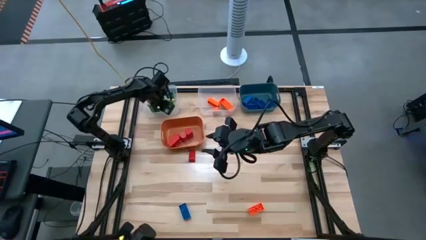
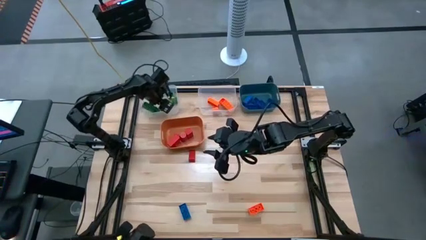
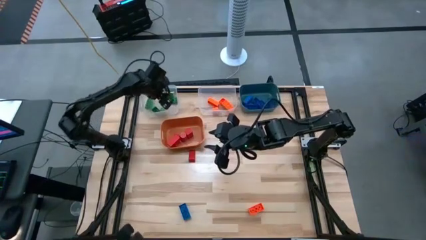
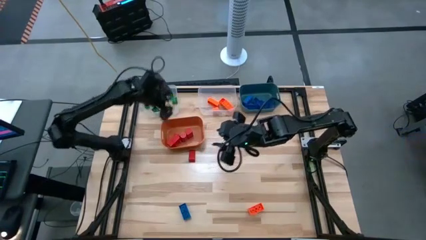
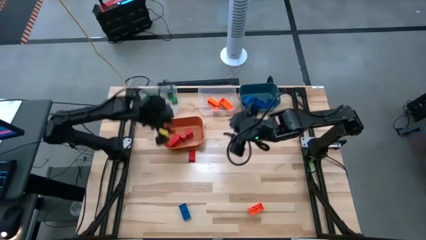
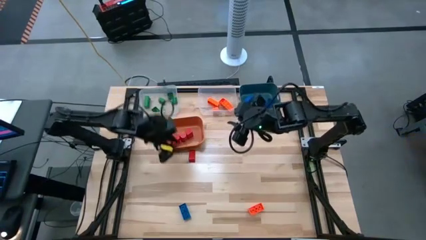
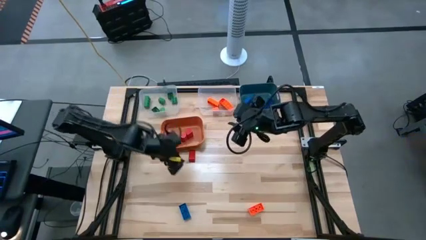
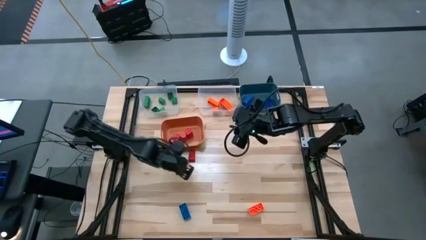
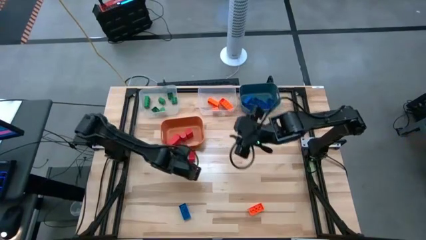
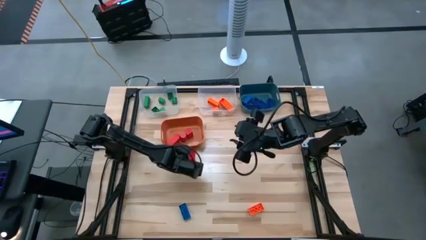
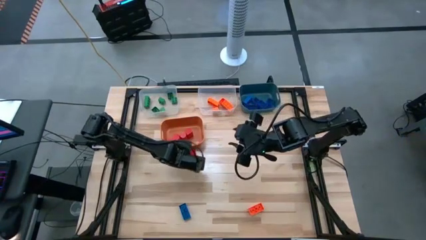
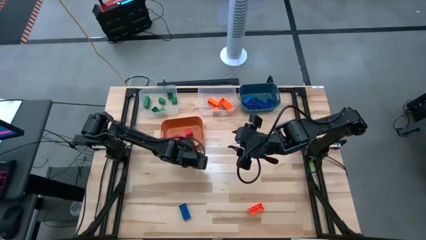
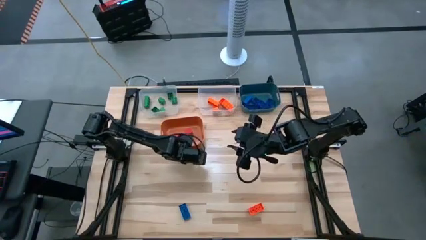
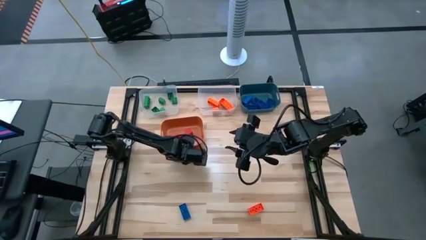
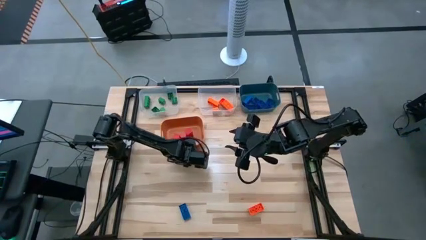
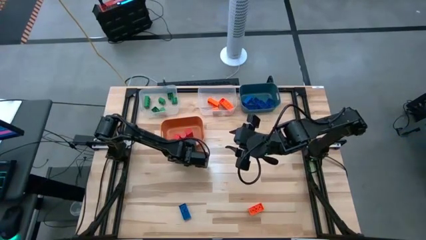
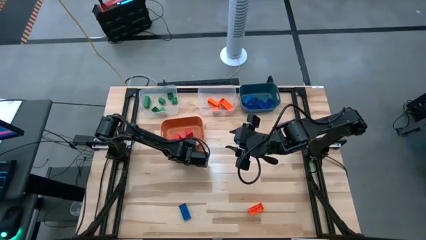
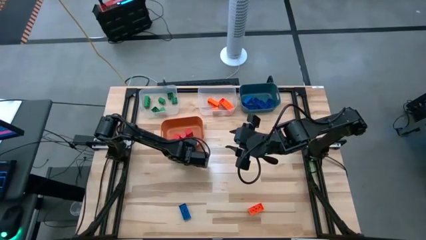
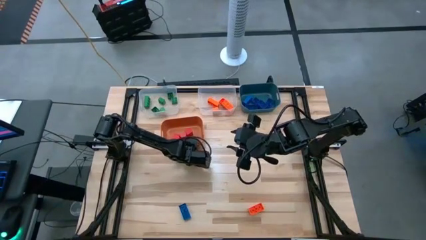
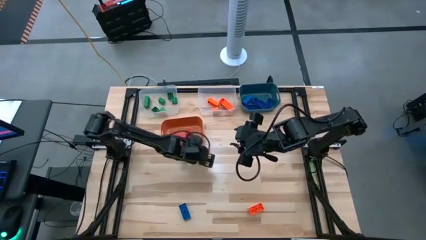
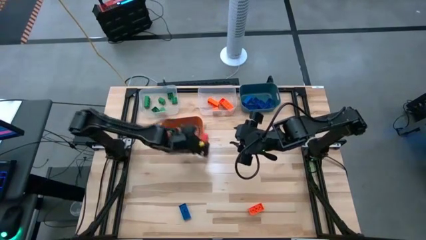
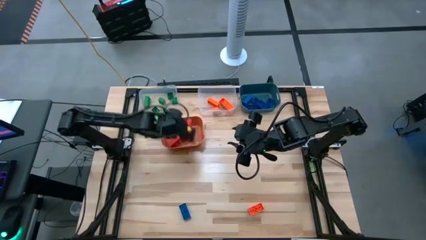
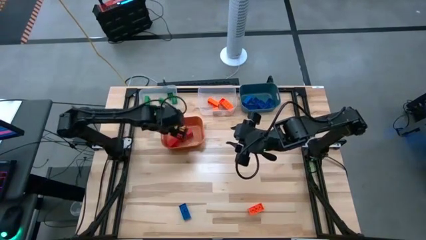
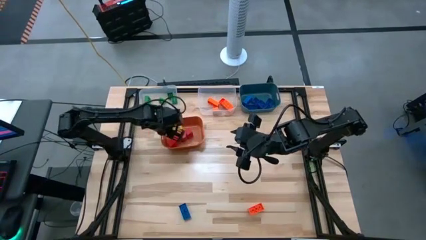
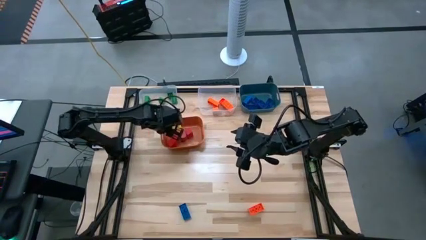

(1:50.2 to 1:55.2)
Task: Sort blocks
Put the red block into the orange bin

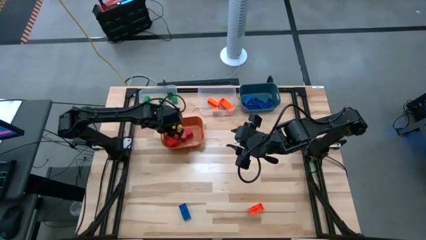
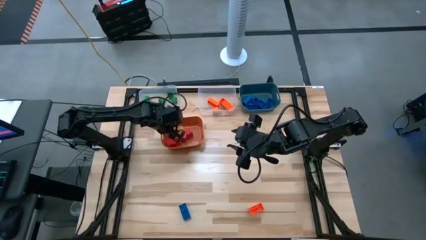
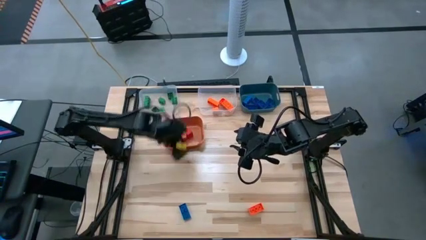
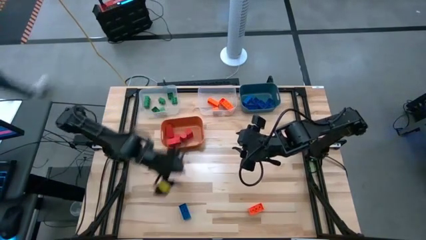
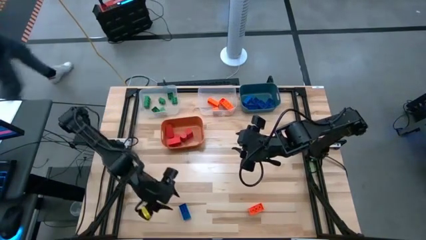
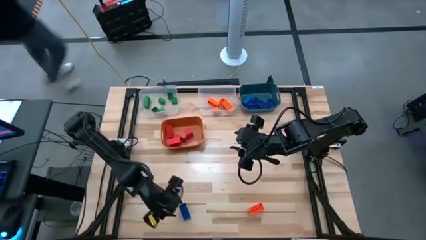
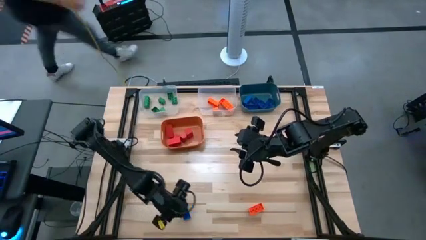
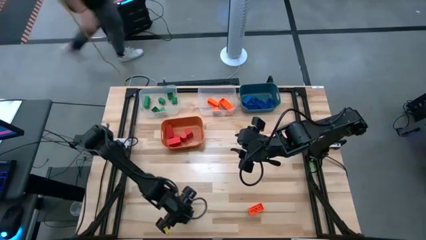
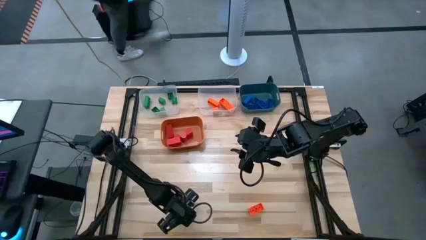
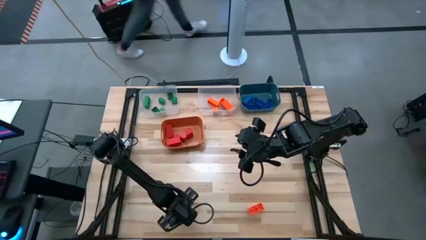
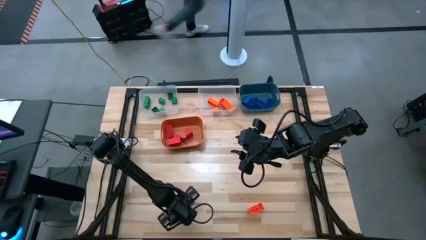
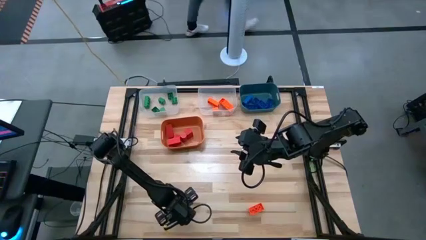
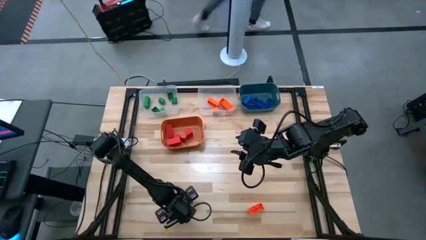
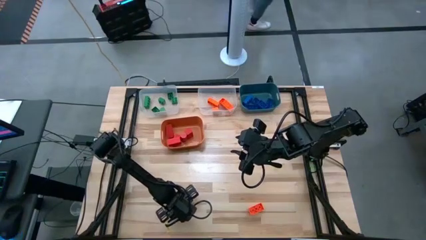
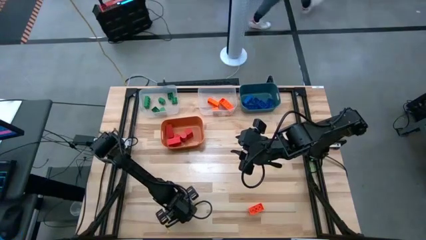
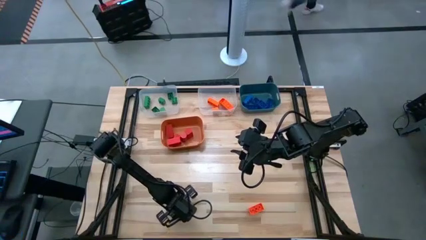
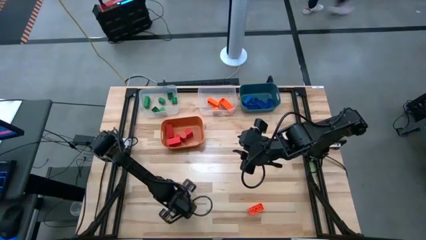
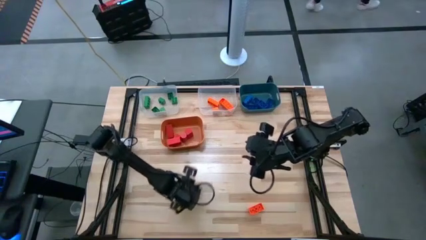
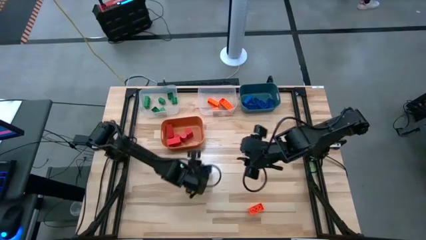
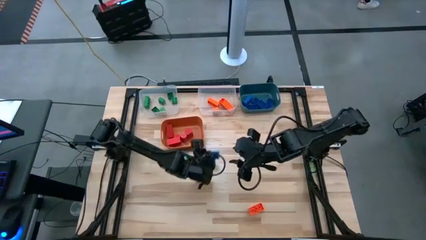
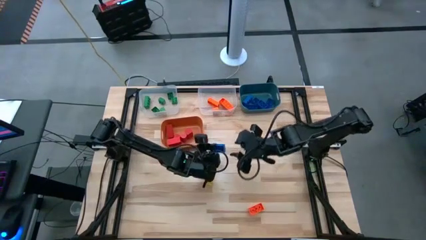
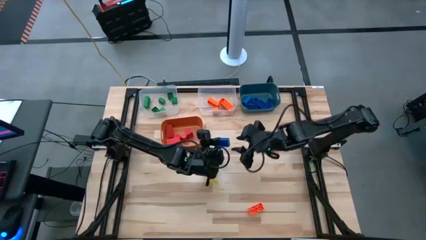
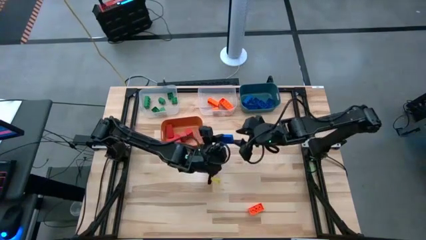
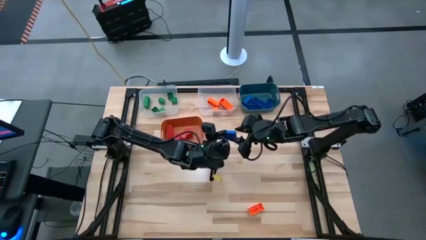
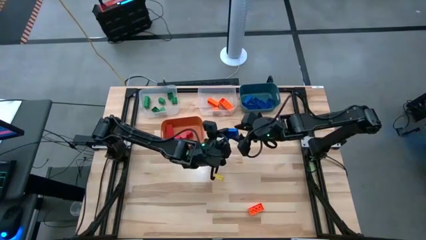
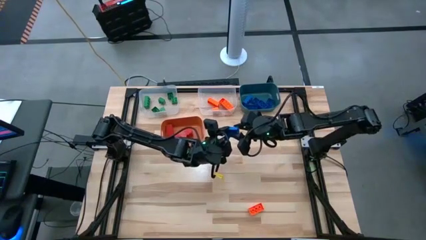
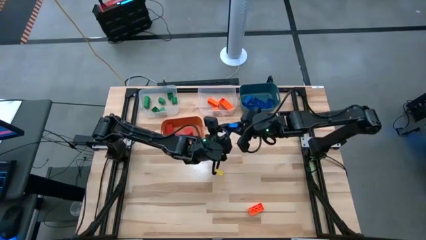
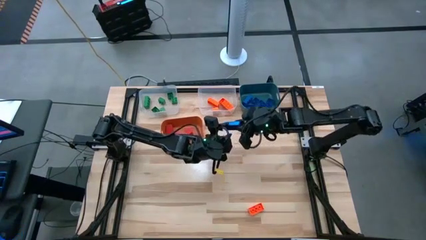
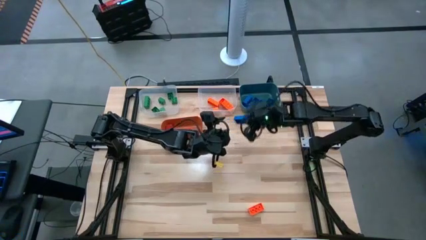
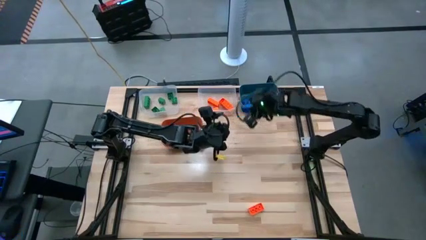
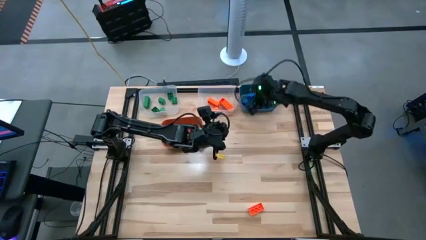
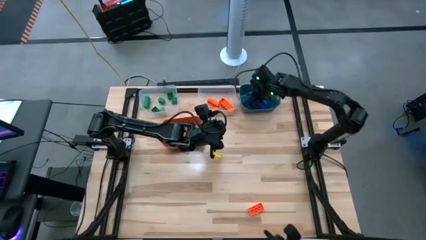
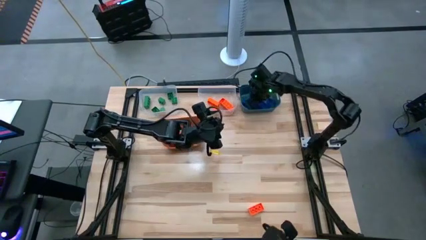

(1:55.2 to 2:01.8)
Put the blue game piece into the blue bin

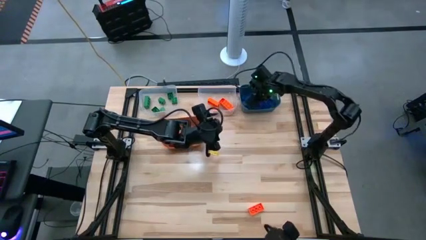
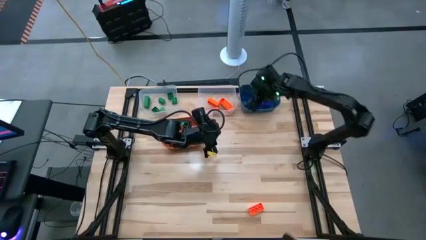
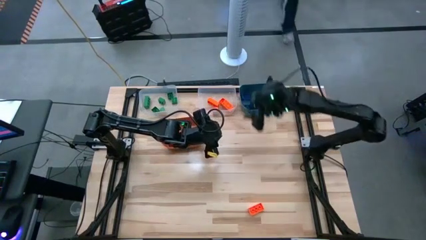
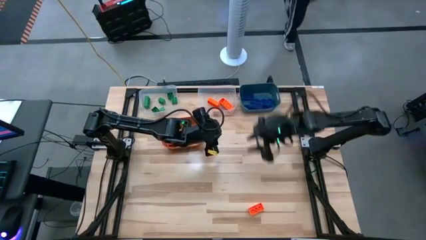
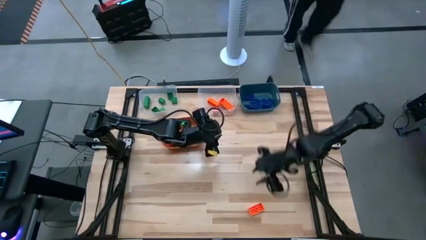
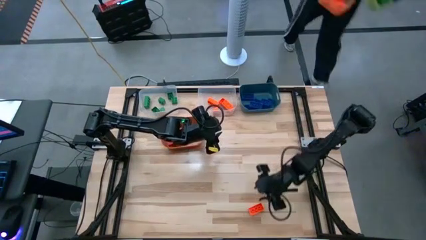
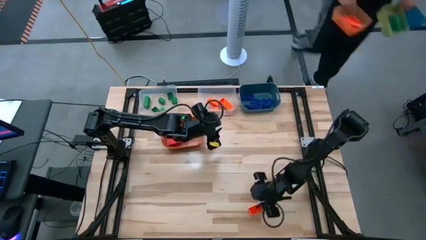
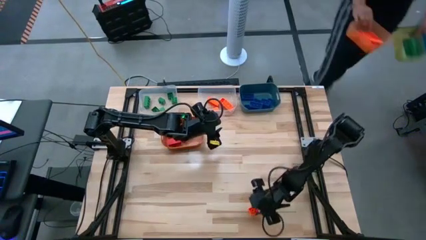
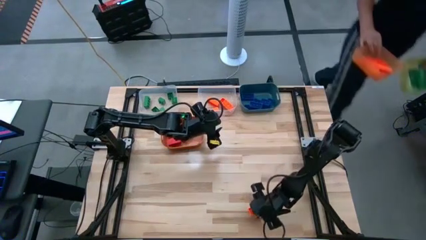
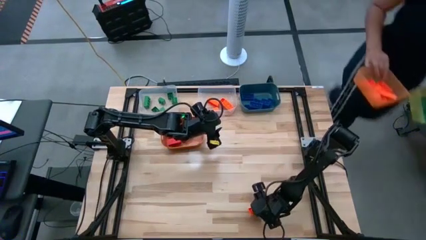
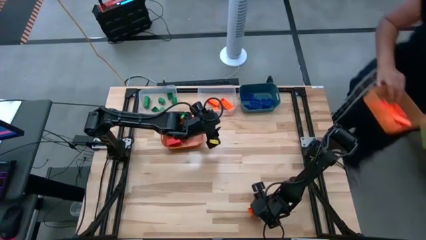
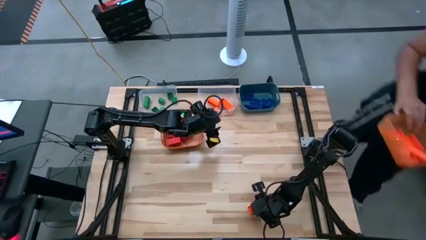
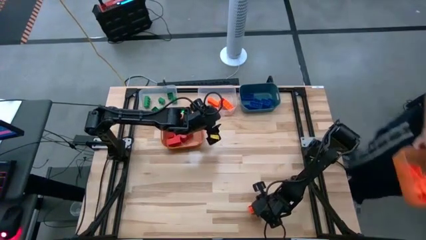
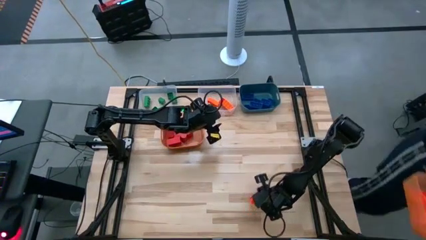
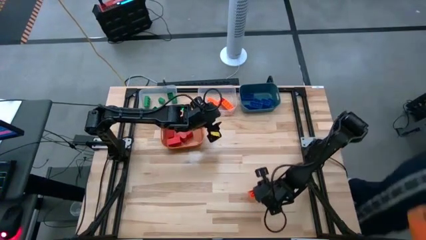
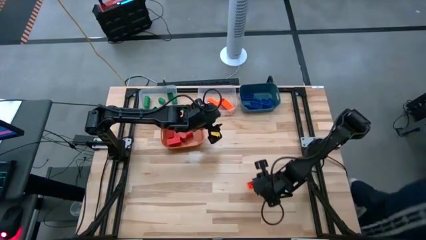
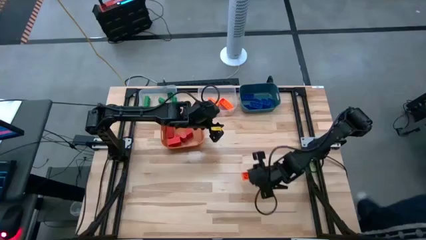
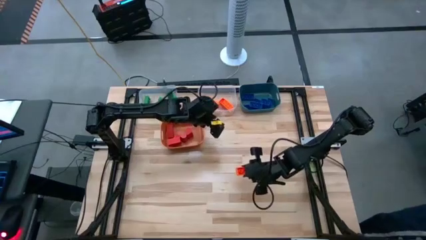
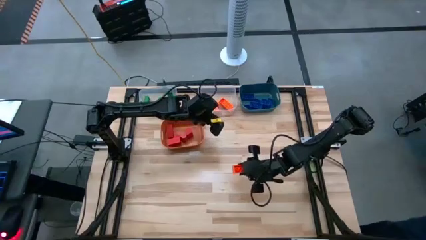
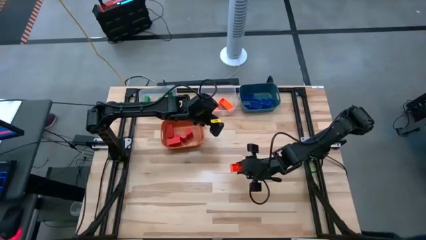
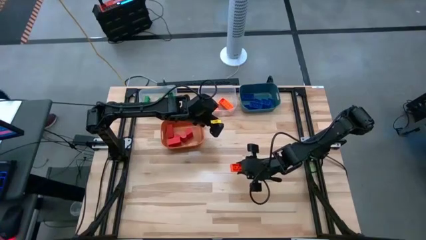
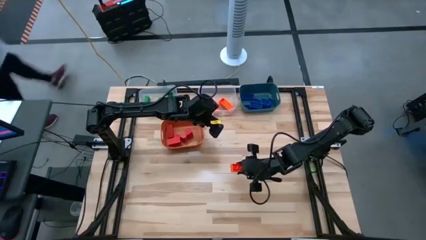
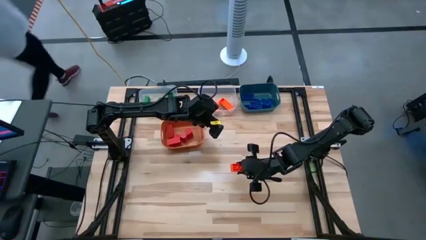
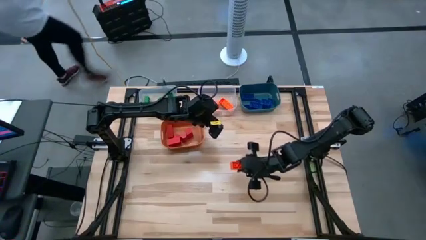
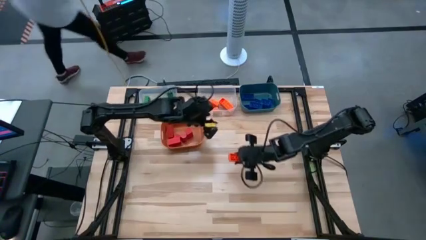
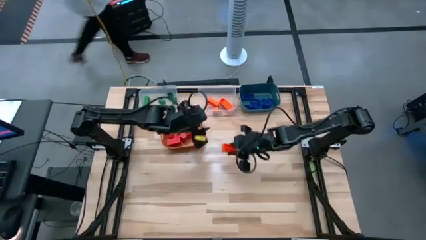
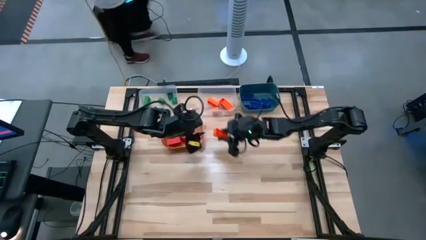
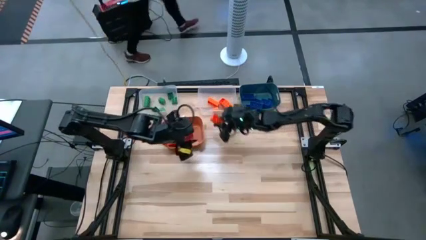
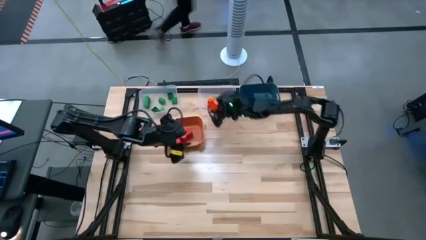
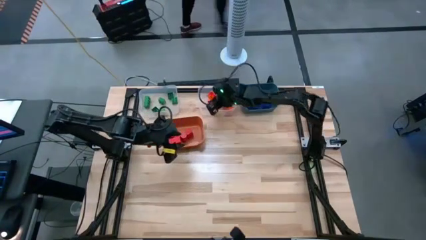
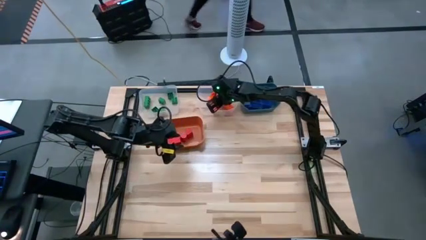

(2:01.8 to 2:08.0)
Put the orange game piece into the right transparent bin
